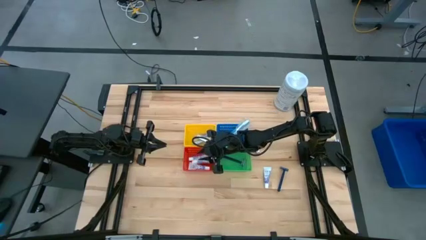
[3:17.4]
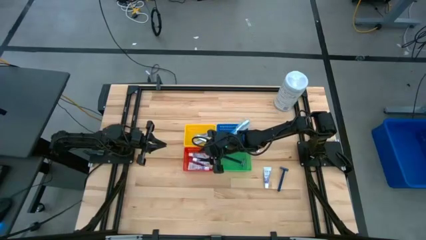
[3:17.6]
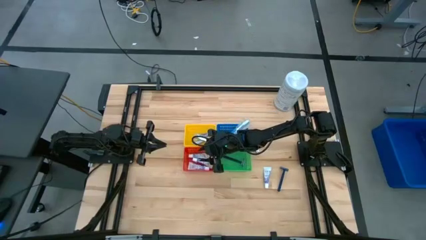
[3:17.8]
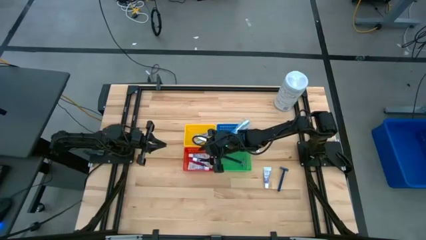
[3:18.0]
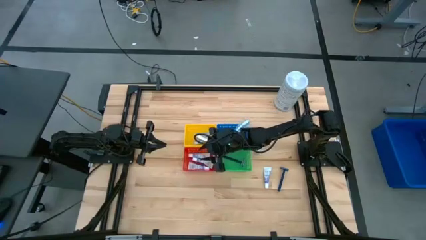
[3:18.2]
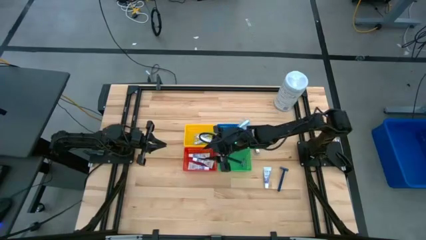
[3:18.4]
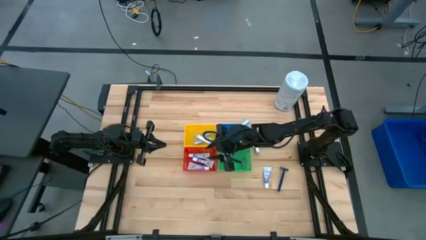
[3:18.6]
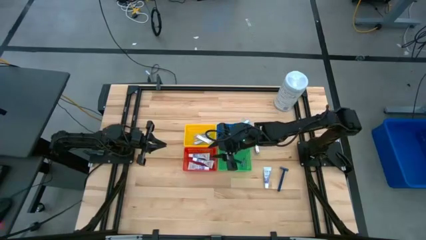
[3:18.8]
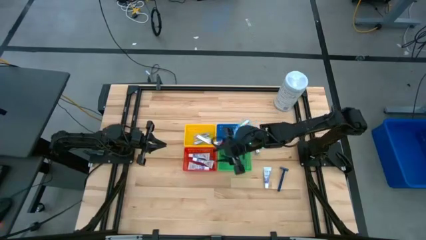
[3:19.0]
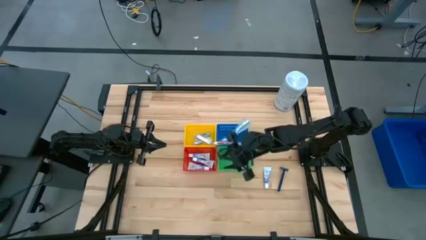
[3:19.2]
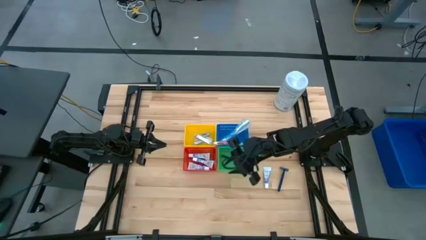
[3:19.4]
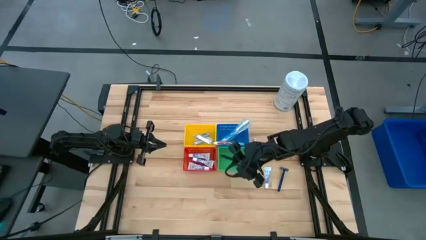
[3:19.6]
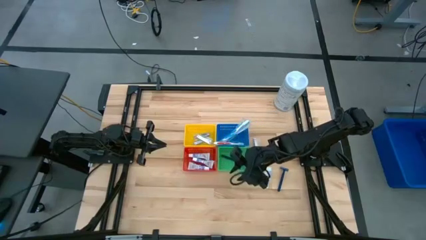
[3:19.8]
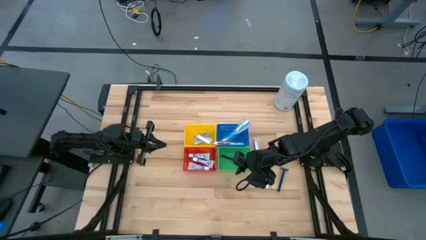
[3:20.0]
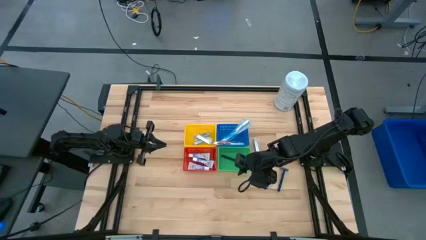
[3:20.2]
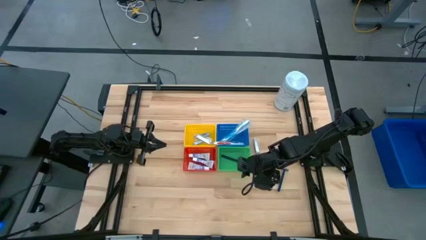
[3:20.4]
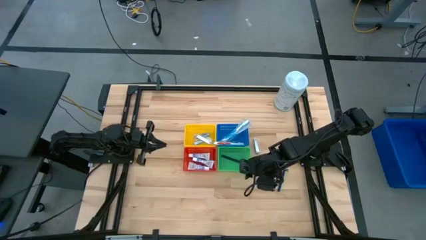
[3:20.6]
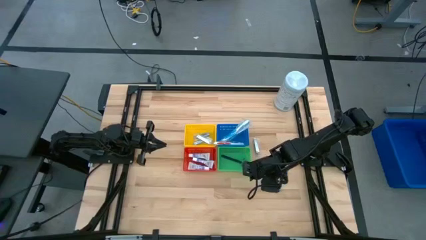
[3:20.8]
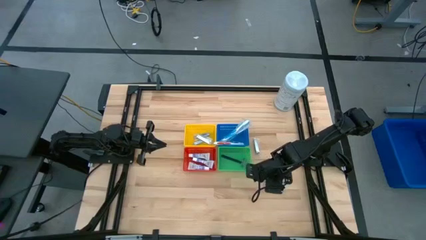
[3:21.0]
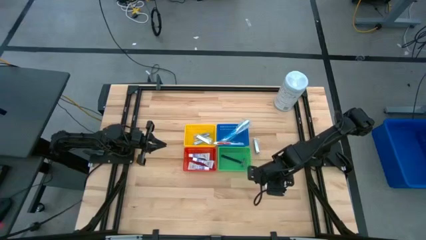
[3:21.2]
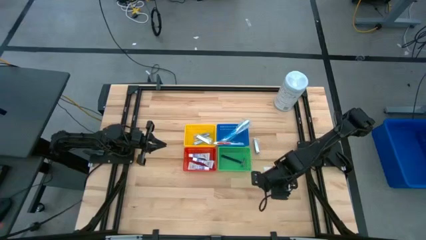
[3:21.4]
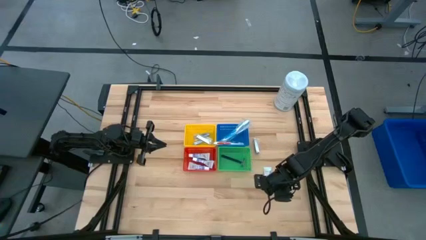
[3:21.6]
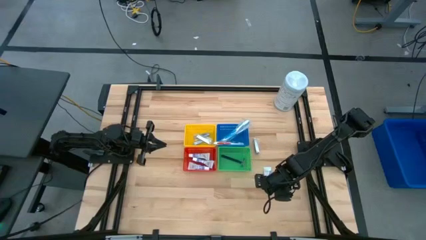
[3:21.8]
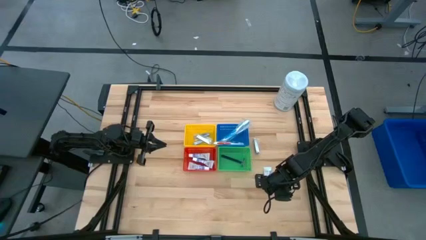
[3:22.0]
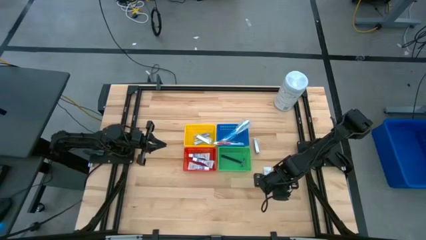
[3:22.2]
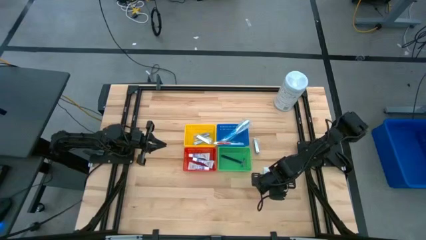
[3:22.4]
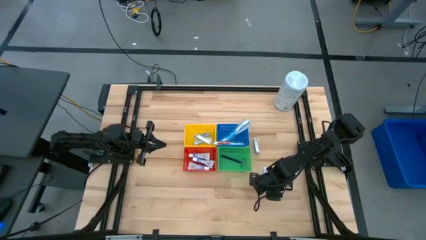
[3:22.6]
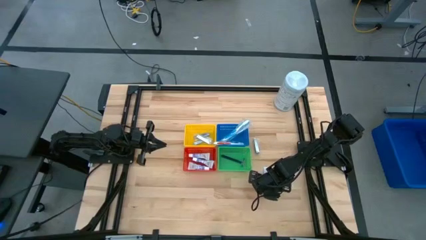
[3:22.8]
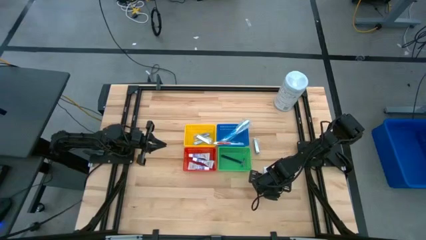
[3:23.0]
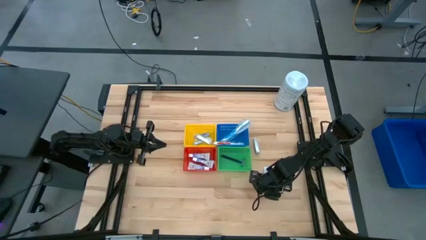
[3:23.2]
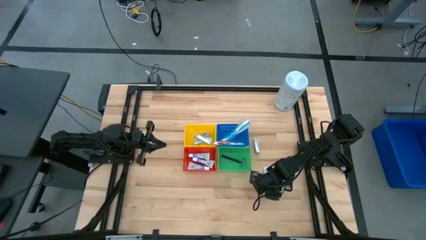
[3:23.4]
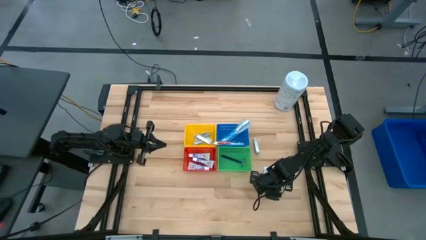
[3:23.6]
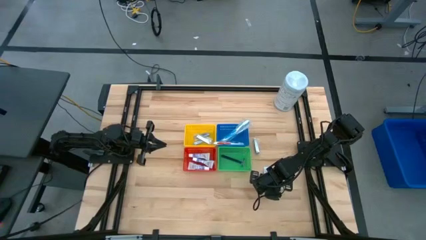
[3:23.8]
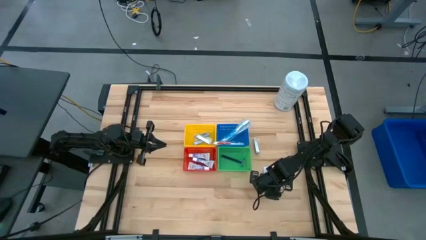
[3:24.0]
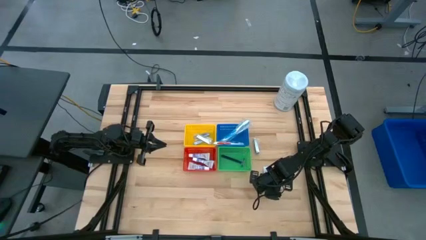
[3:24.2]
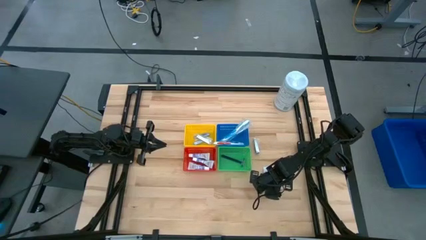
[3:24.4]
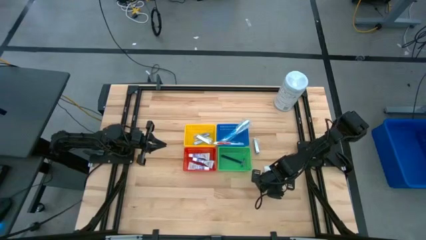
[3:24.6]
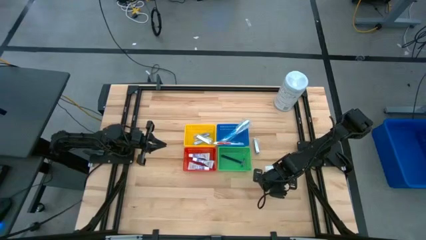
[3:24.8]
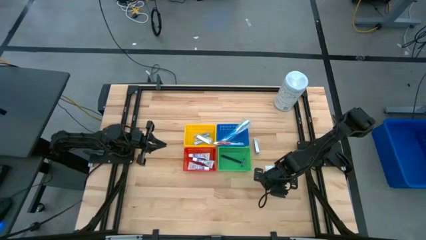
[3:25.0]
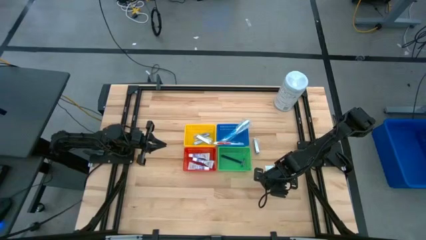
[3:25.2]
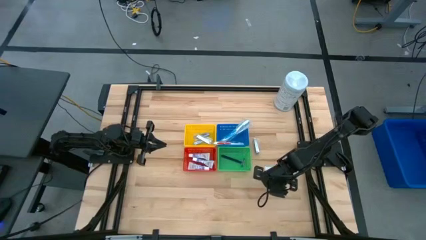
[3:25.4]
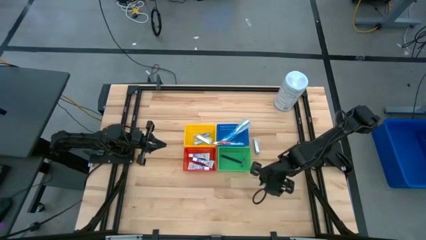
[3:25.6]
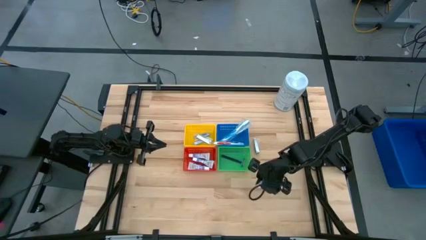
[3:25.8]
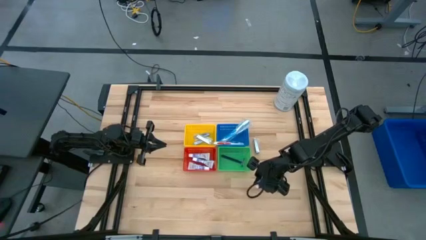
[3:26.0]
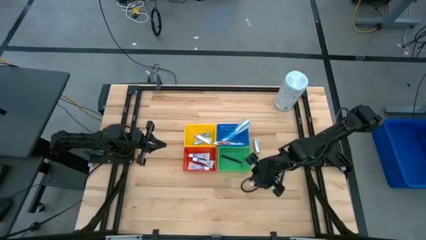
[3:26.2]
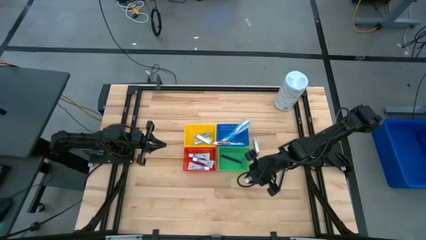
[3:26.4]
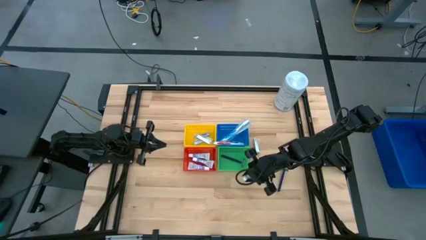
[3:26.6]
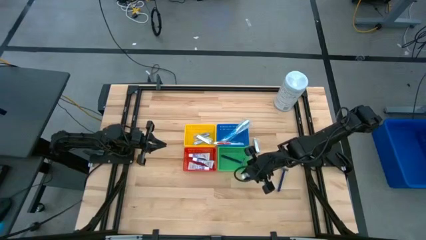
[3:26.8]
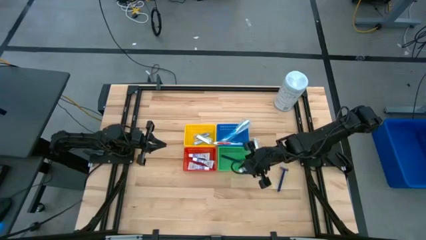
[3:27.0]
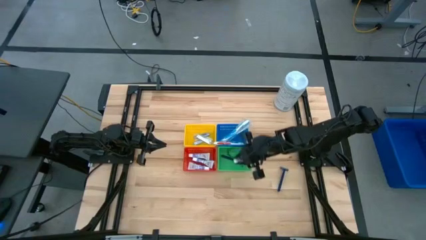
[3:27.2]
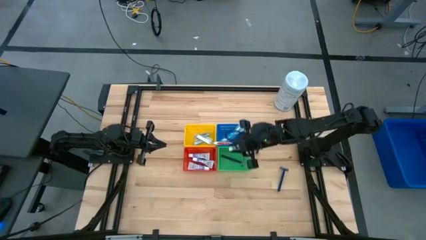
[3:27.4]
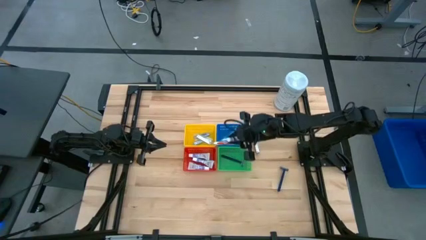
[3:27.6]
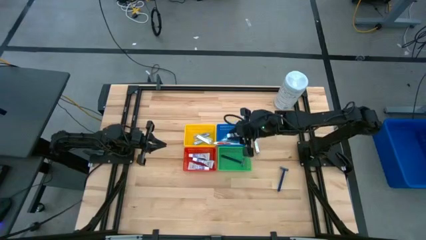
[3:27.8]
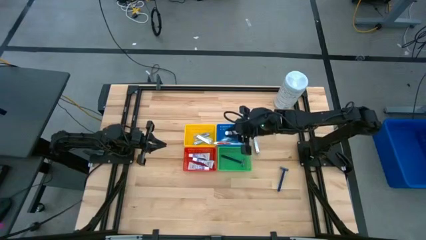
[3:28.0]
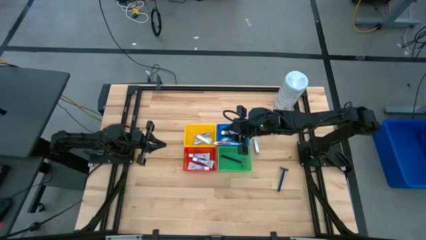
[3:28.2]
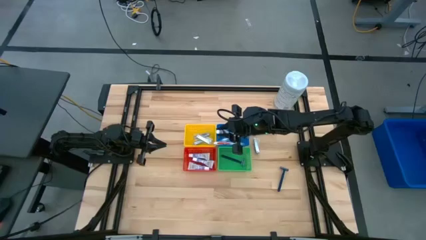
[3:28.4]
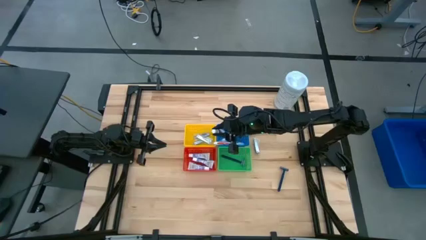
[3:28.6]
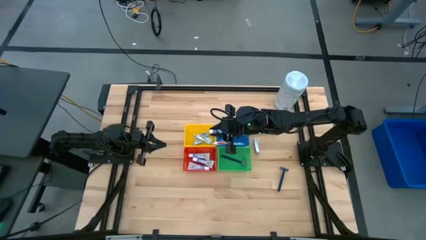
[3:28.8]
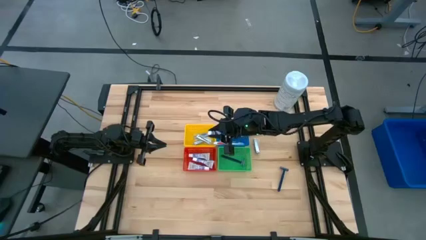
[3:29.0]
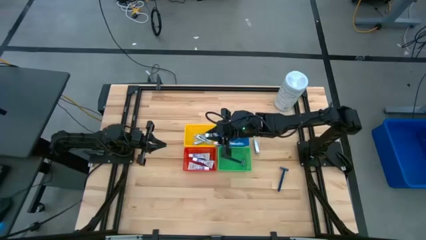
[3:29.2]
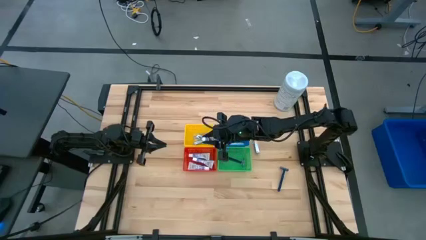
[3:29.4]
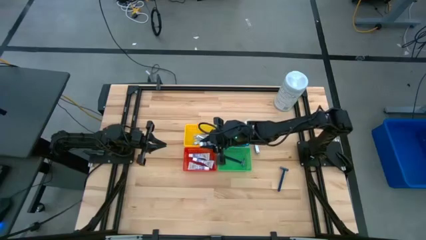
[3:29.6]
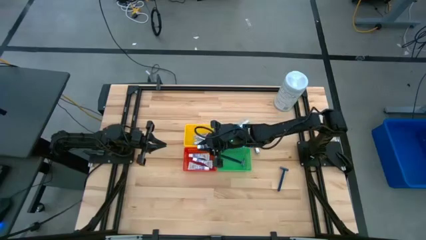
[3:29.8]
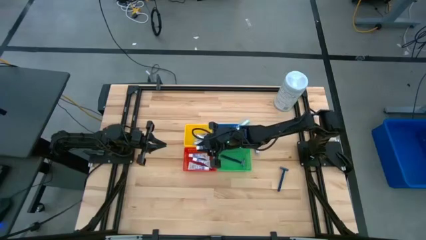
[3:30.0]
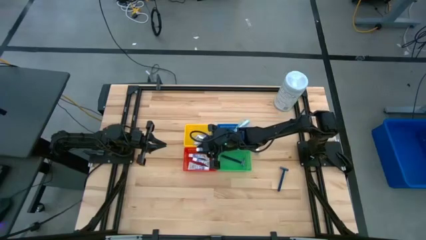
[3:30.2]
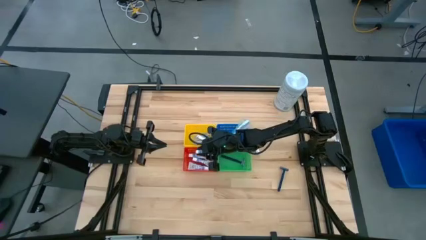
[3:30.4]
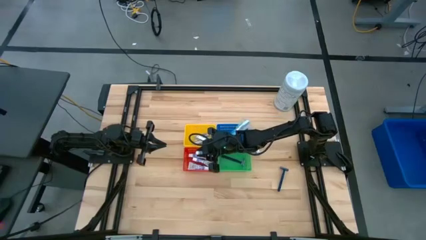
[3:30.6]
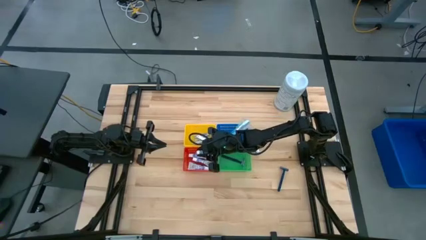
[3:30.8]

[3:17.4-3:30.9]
Task: Pick & Place Travel size toiletries
Put the toothpaste into the red bin

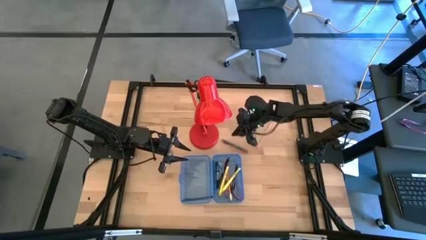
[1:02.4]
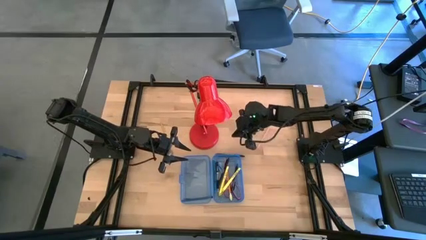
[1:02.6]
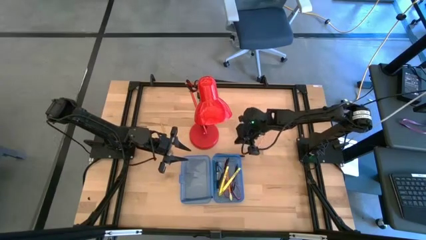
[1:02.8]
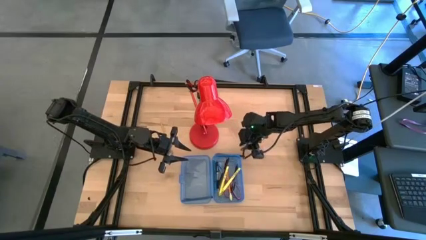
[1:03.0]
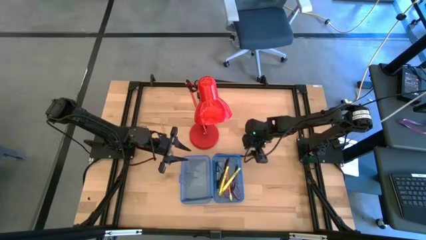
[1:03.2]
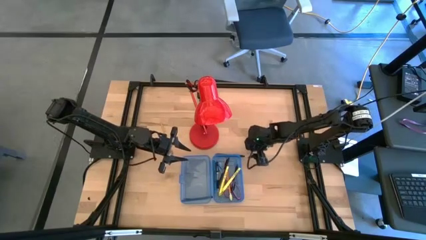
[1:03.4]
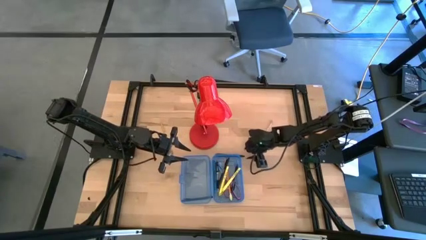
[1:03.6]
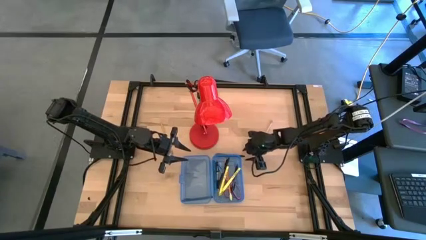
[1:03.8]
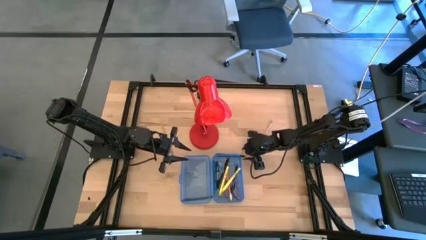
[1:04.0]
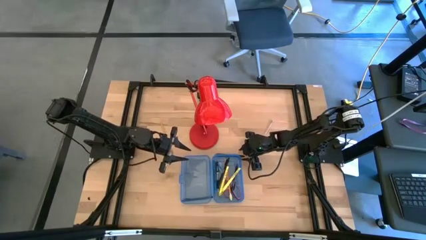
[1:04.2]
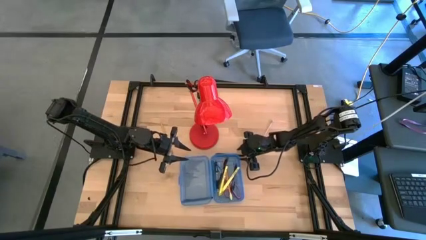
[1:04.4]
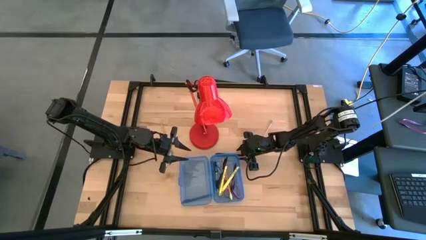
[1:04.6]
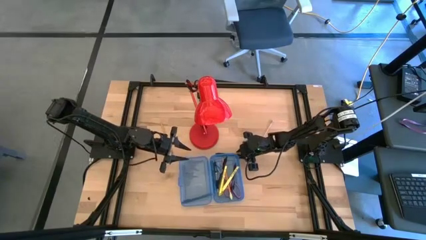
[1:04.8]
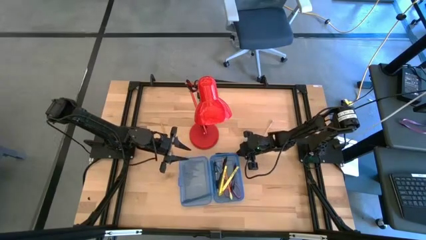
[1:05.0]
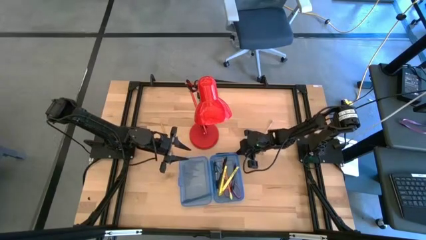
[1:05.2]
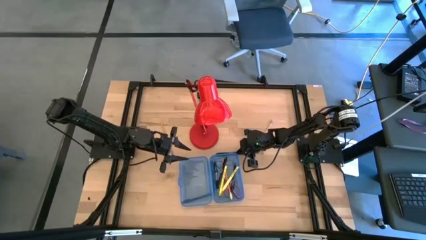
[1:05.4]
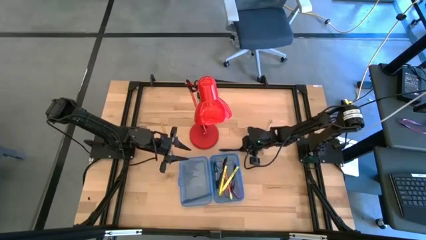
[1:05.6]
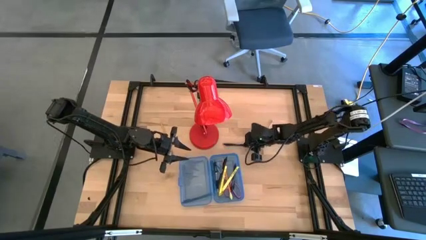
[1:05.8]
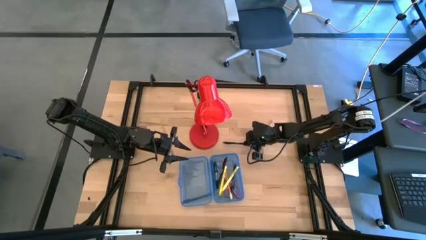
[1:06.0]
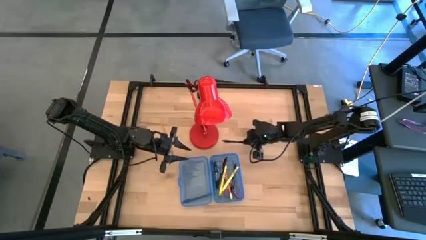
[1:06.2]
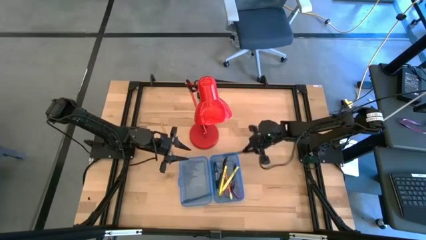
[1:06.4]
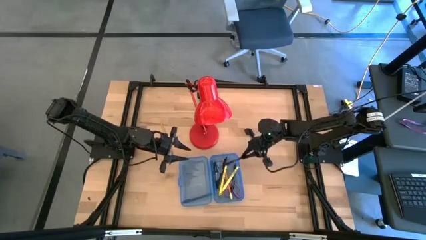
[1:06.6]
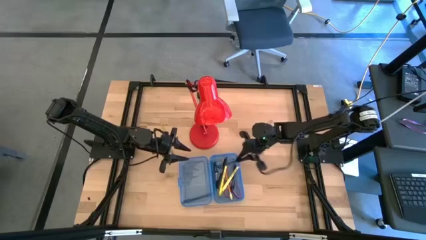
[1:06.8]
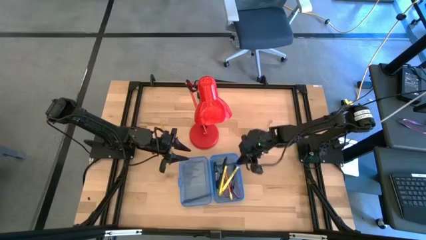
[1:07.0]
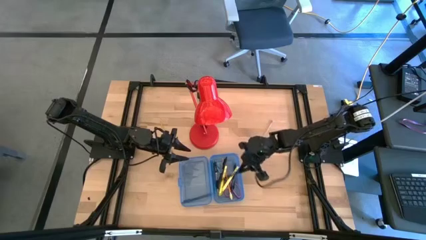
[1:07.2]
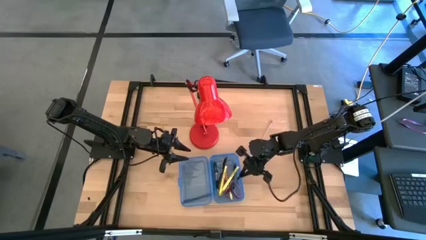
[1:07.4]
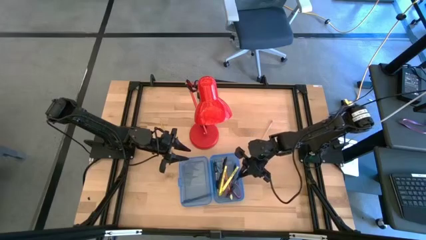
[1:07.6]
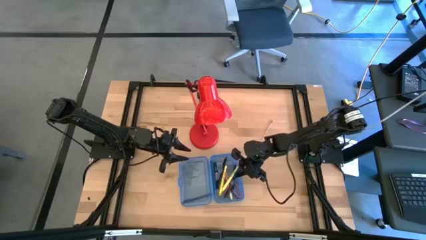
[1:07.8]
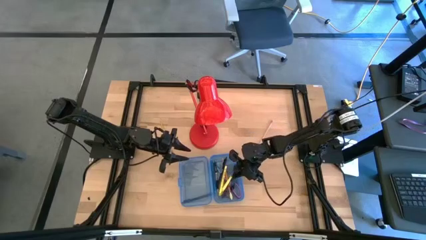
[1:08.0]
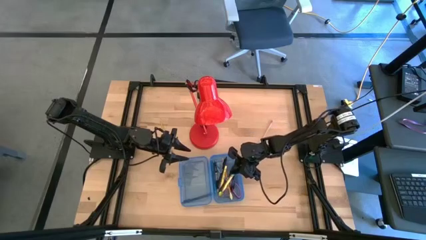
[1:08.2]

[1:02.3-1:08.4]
Task: Pick & place school supplies into a supply box
Put the top black pen into the blue supply box
